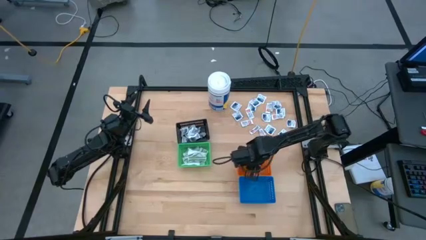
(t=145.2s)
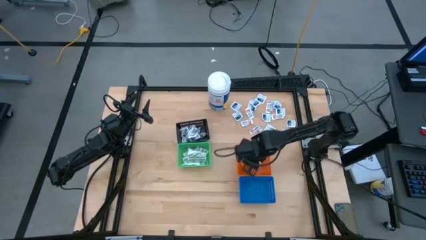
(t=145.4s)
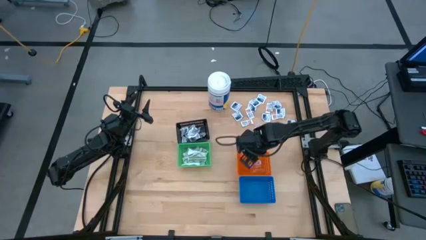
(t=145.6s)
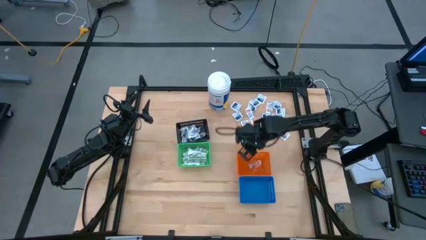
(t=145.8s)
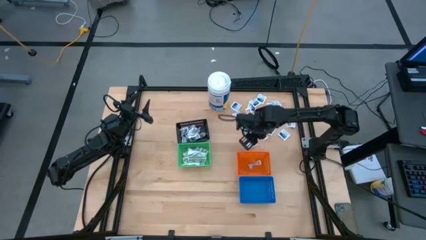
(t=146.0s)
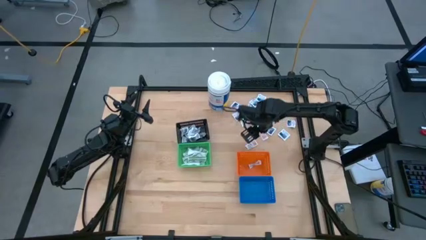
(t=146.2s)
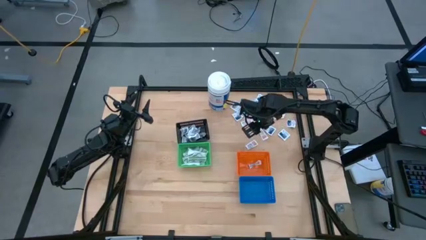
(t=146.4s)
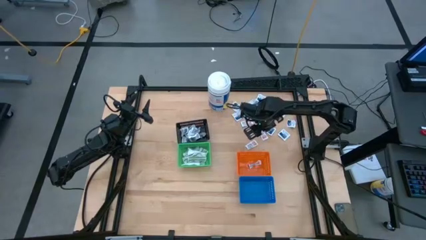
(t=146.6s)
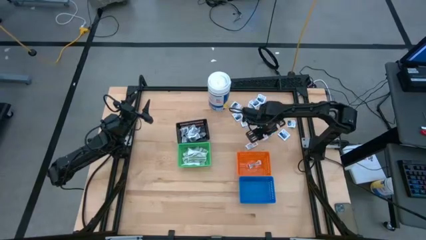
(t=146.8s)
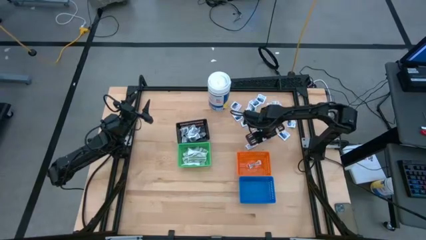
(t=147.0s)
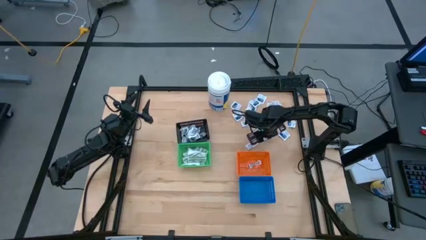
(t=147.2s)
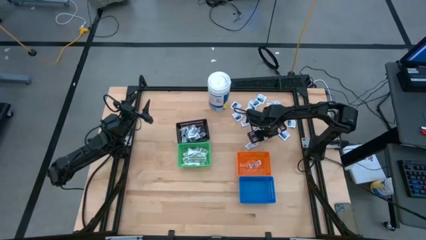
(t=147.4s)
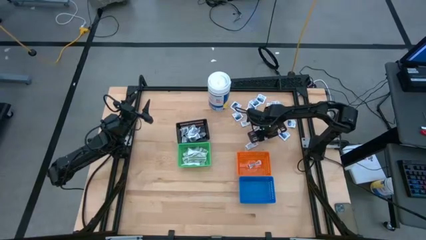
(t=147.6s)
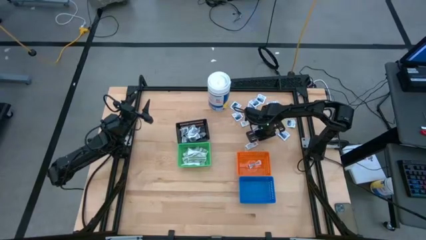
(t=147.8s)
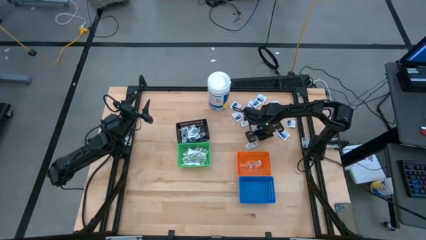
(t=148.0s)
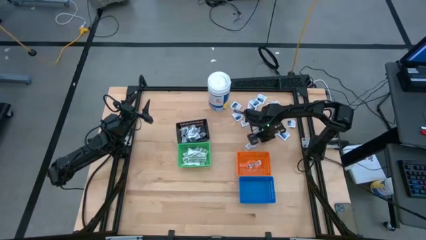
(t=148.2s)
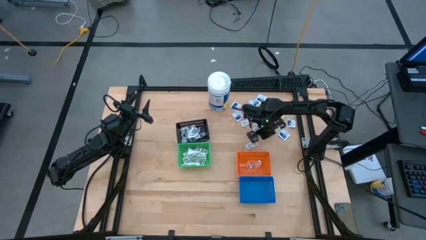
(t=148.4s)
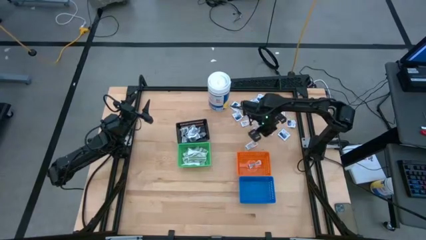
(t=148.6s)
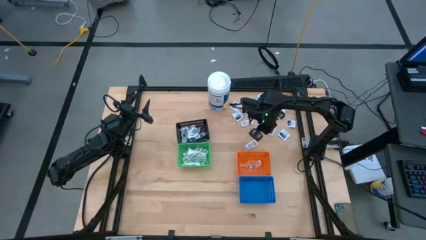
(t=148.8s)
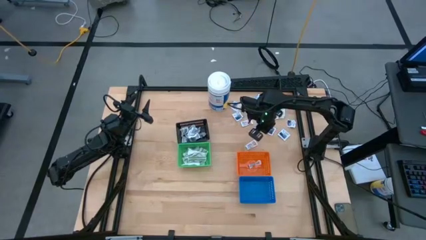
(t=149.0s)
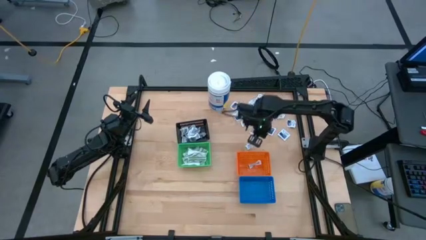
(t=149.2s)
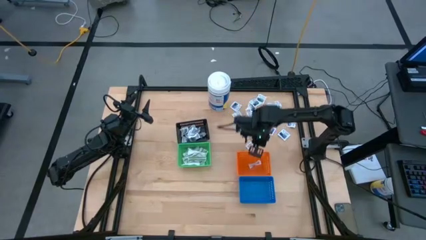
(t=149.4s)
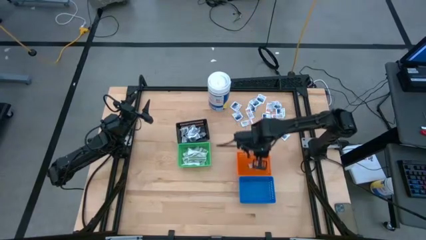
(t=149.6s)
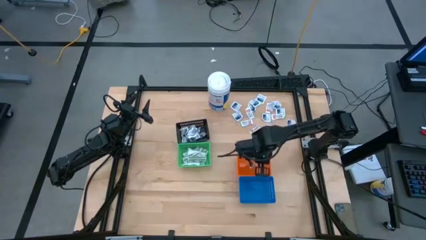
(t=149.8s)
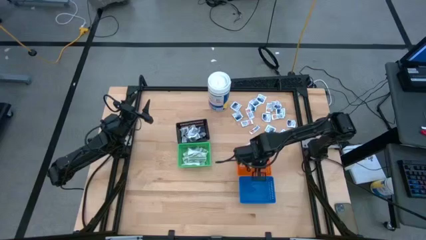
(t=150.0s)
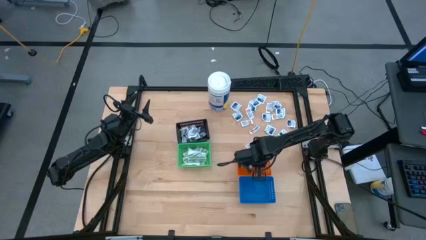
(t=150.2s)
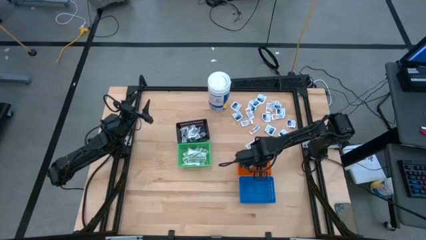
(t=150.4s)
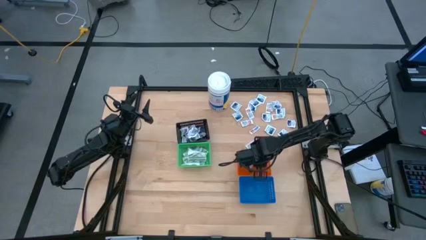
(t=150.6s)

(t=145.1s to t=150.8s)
Task: Pick & Place First Aid Supplies
Put the orange pad into the orange bin

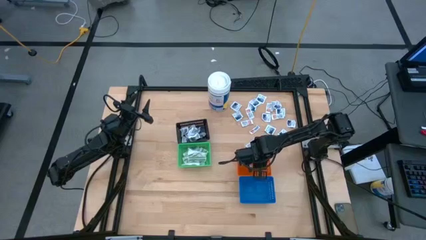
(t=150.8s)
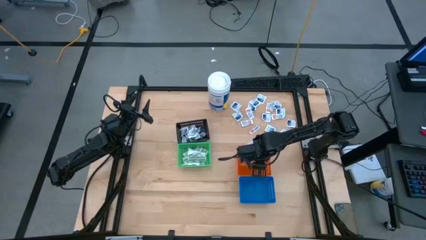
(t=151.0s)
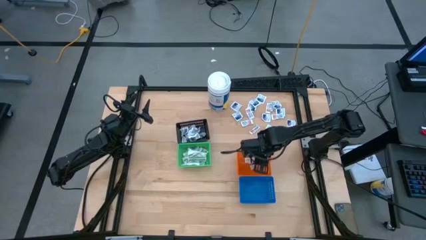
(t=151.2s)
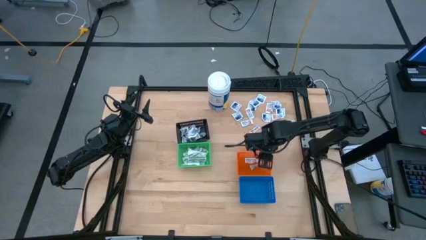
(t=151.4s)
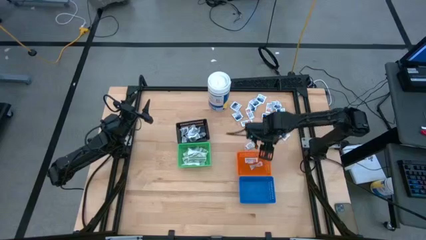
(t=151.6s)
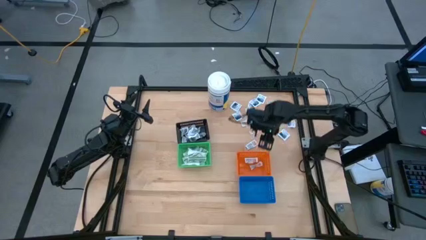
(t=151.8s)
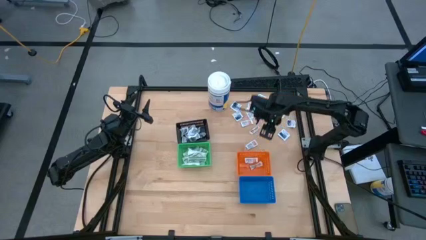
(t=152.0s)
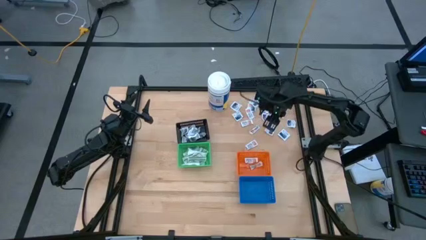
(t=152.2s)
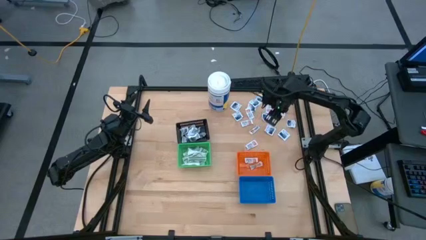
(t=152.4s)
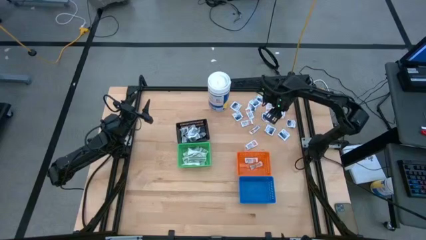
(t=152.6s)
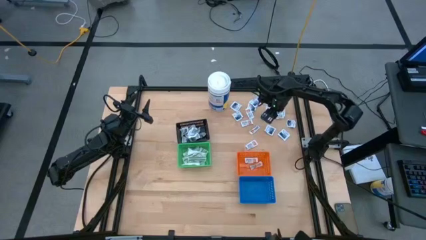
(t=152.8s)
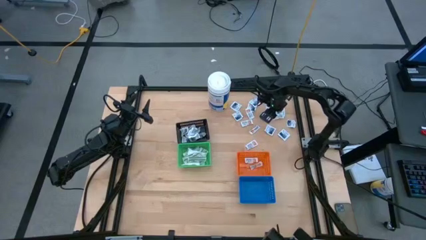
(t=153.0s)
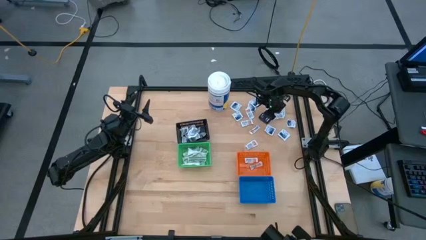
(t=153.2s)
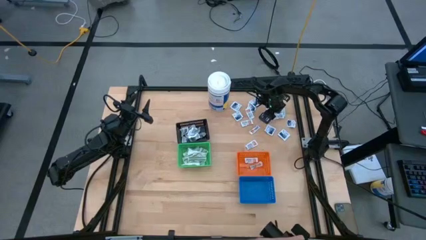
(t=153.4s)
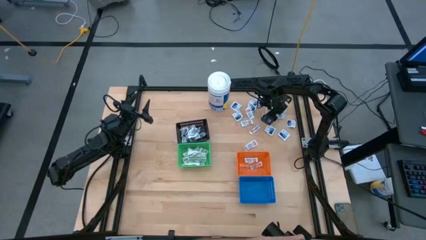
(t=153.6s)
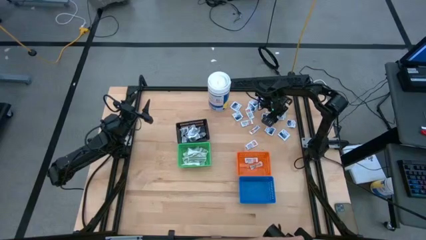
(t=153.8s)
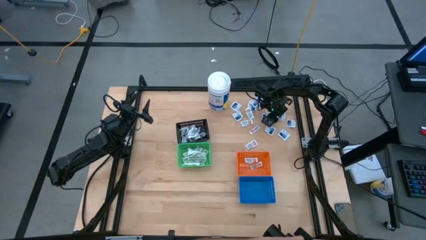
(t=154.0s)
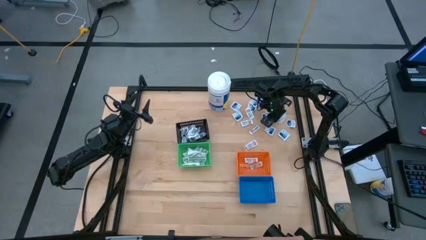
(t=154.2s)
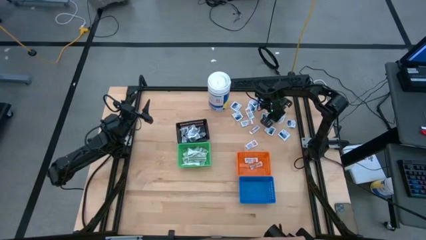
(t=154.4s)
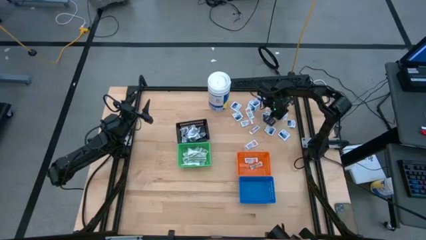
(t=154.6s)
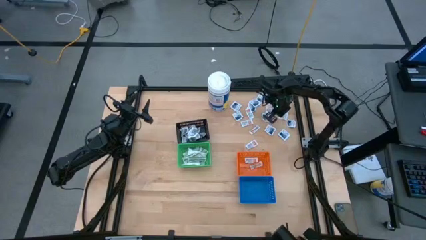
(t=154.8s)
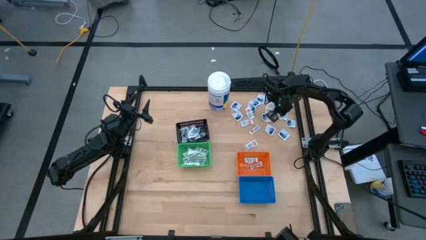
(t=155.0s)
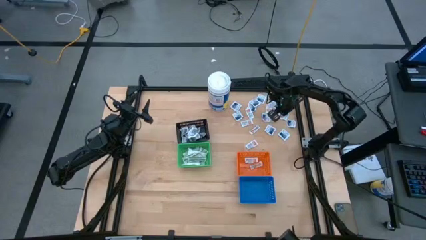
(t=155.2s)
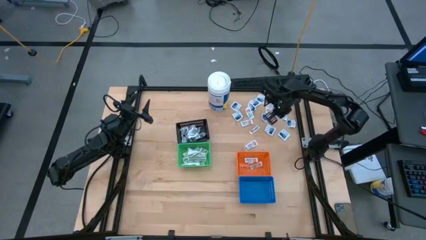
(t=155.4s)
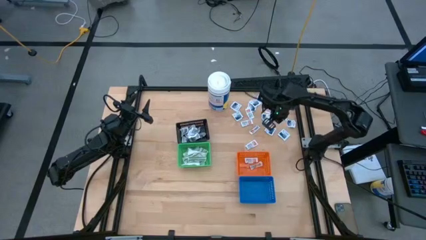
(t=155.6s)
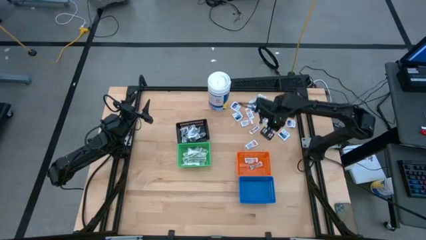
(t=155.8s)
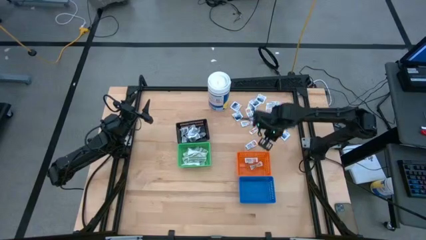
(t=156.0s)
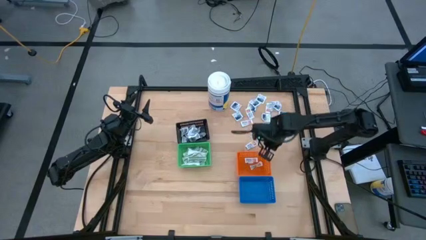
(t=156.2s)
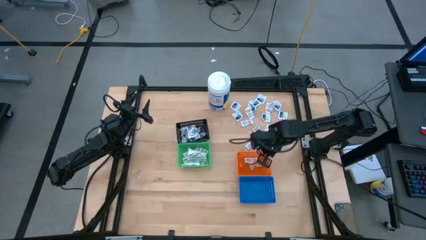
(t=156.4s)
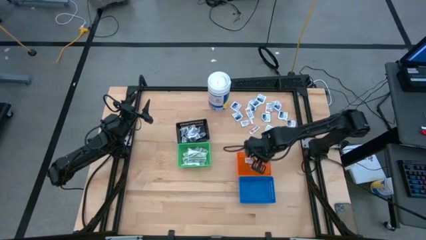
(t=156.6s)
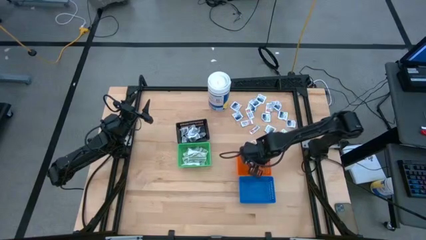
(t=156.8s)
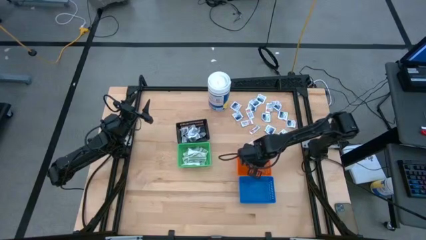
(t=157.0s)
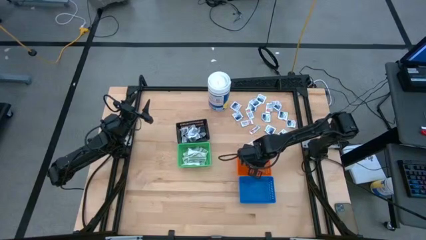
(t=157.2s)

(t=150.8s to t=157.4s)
Put the orange pad into the orange bin

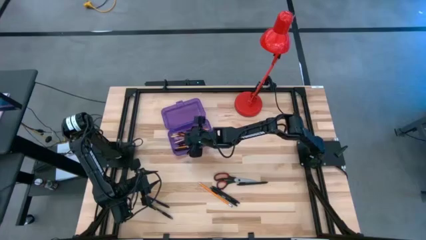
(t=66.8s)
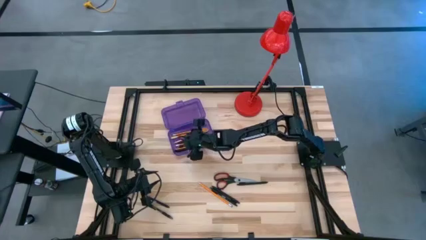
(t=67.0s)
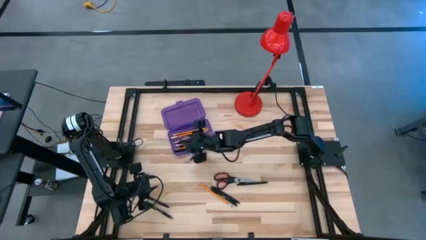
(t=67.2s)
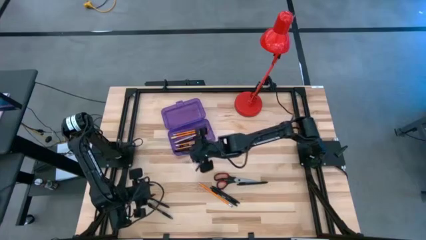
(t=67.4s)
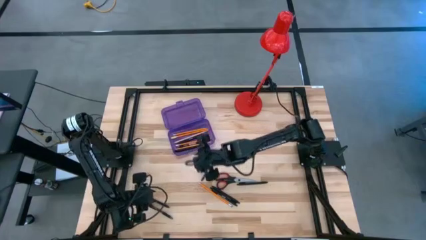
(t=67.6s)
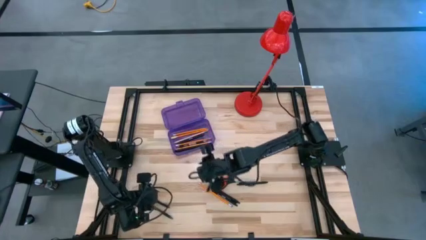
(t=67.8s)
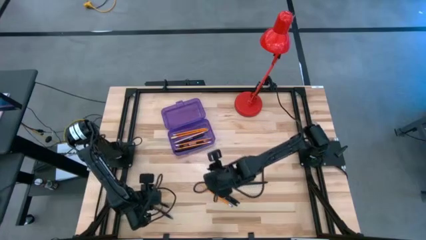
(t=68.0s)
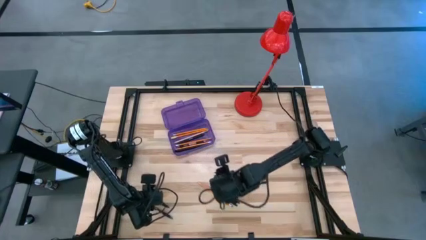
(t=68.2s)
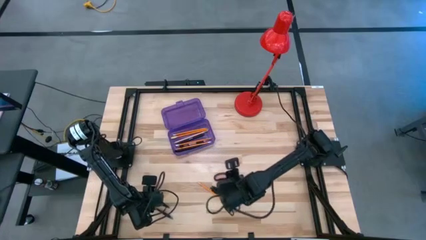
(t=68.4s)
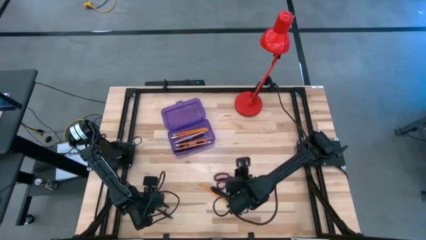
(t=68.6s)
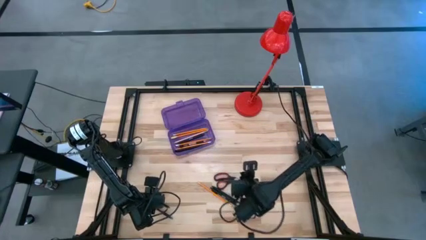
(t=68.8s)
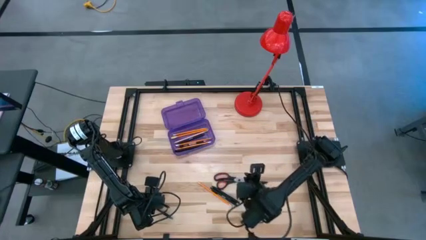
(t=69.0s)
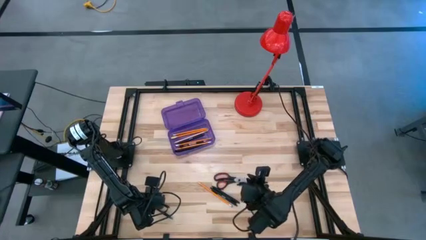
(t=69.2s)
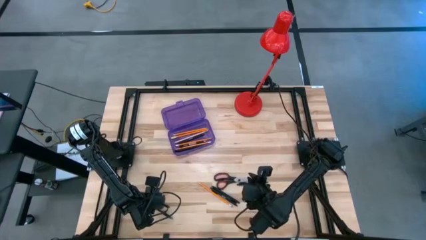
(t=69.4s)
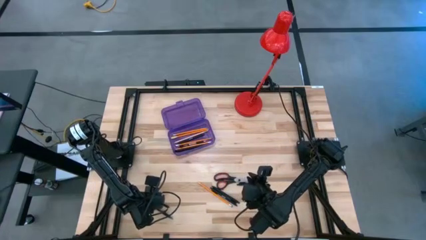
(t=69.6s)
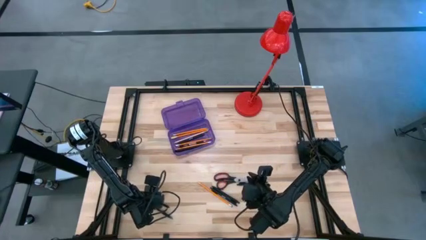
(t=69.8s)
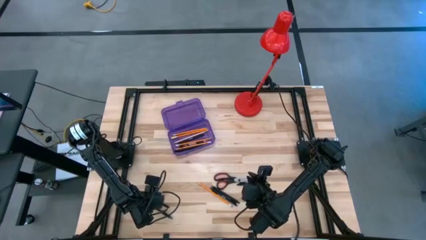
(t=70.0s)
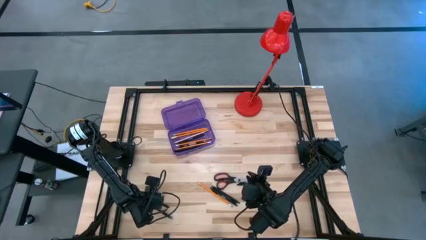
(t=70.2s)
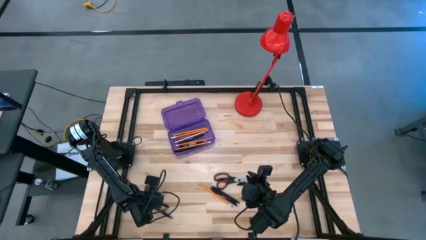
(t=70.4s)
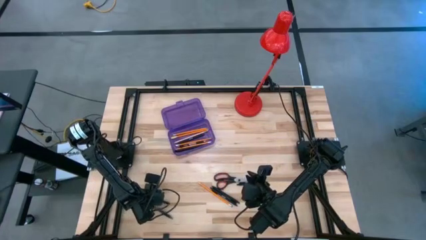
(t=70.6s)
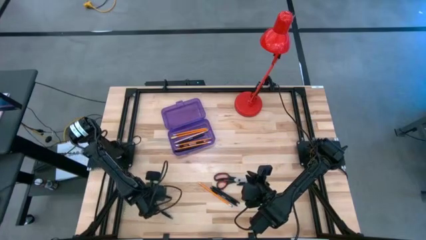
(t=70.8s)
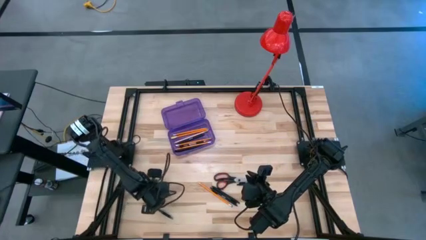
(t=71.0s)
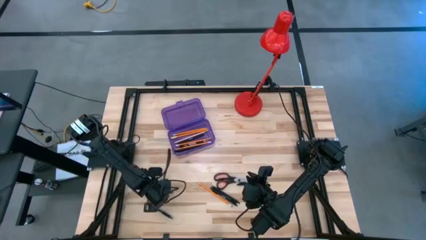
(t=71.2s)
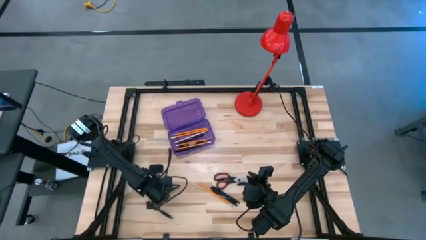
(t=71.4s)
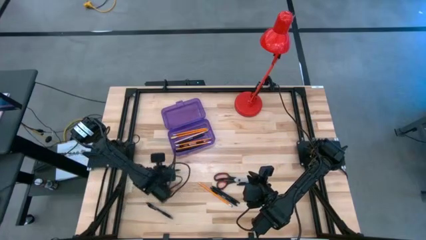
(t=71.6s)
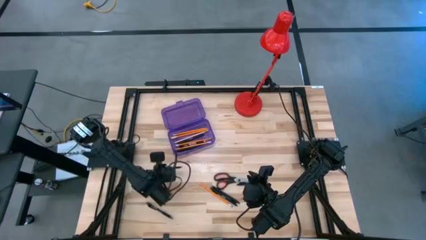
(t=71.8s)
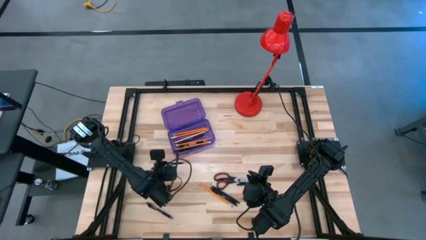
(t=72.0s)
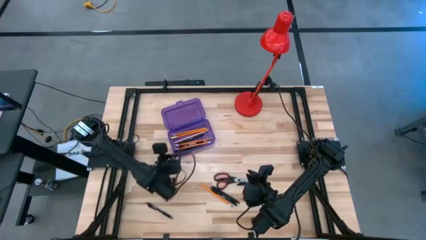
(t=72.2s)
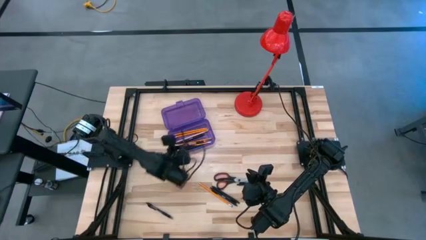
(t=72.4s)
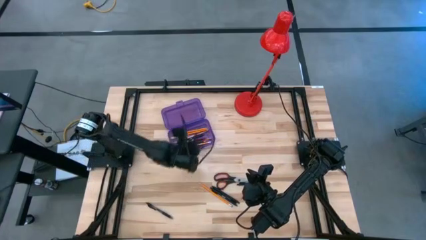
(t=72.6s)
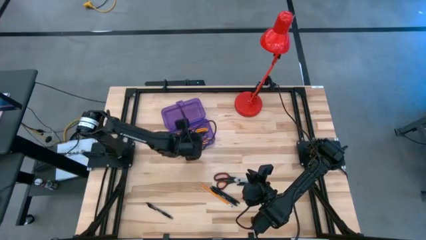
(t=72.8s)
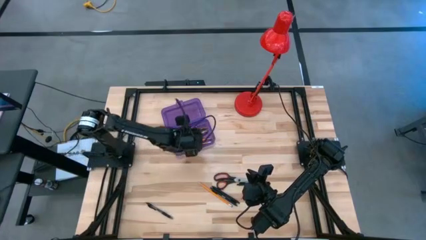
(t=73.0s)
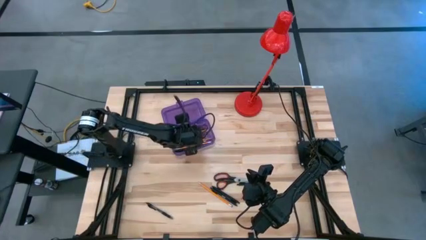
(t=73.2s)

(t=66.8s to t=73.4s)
Task: Pick & place school supplies into a supply box
Put the black pen into the purple supply box
